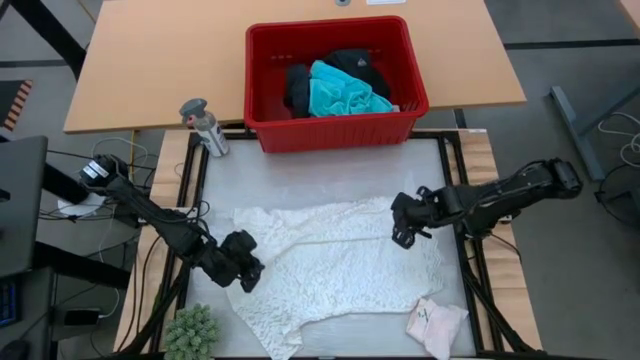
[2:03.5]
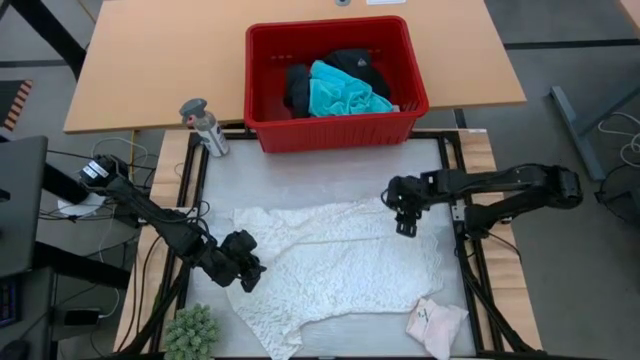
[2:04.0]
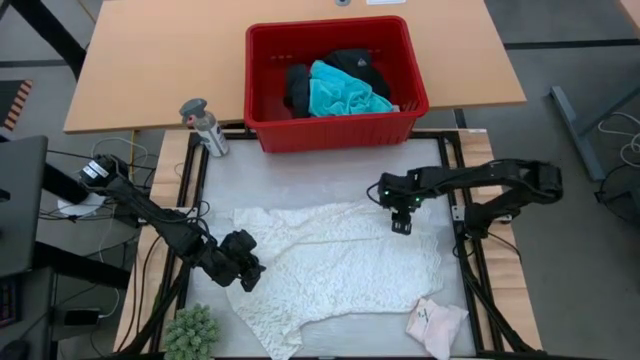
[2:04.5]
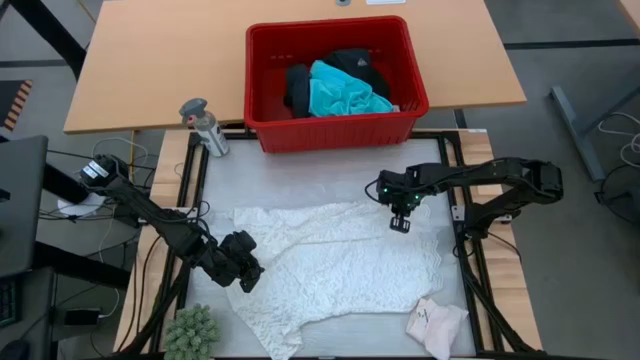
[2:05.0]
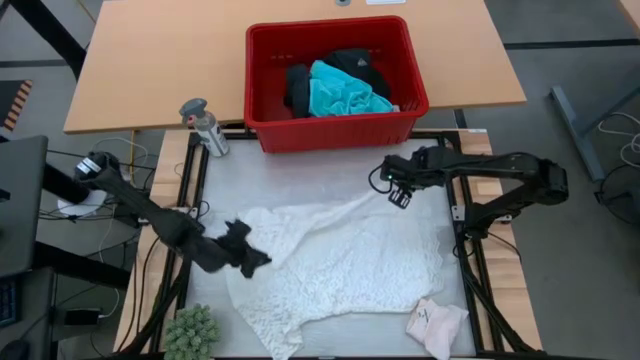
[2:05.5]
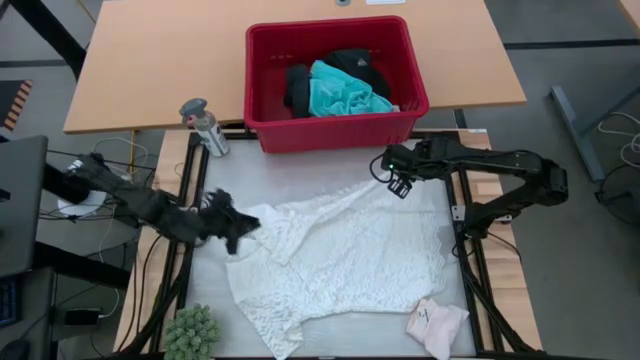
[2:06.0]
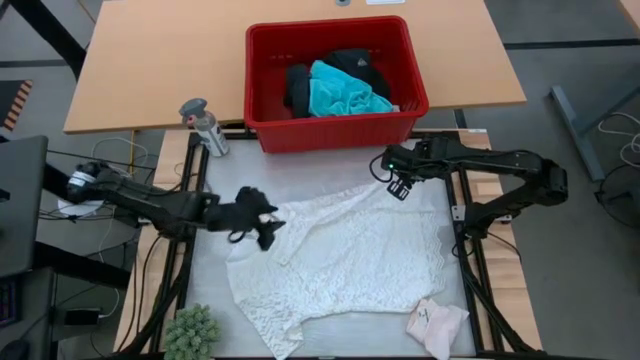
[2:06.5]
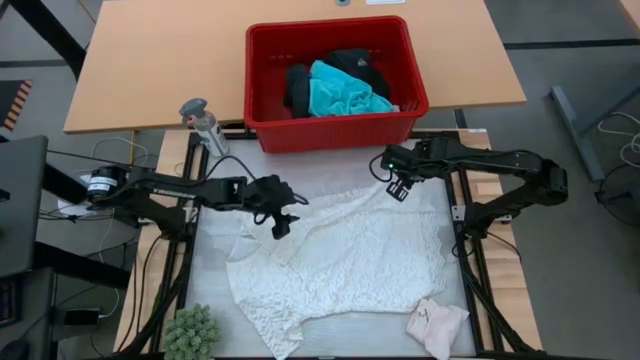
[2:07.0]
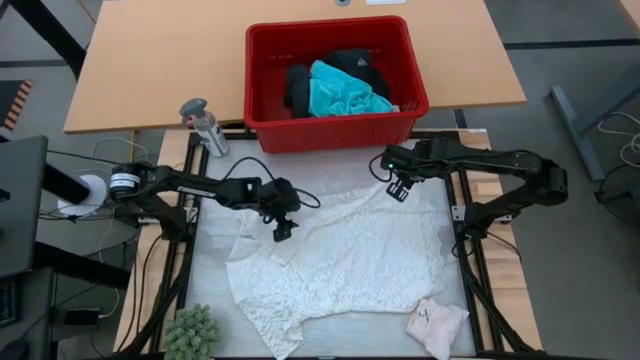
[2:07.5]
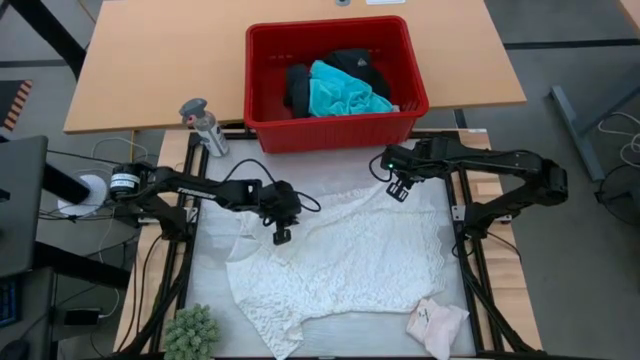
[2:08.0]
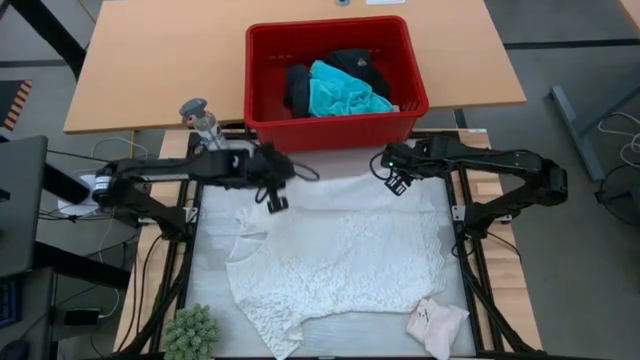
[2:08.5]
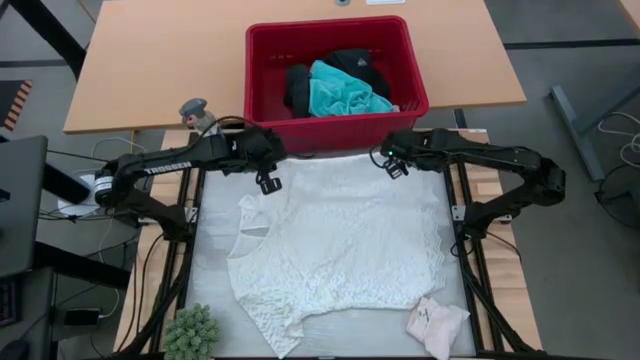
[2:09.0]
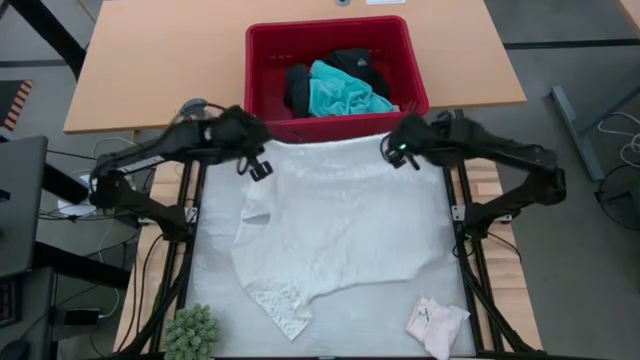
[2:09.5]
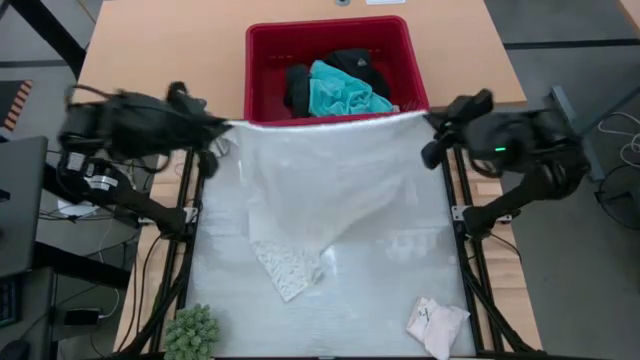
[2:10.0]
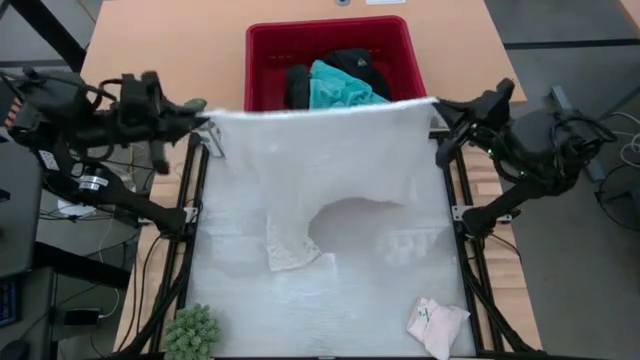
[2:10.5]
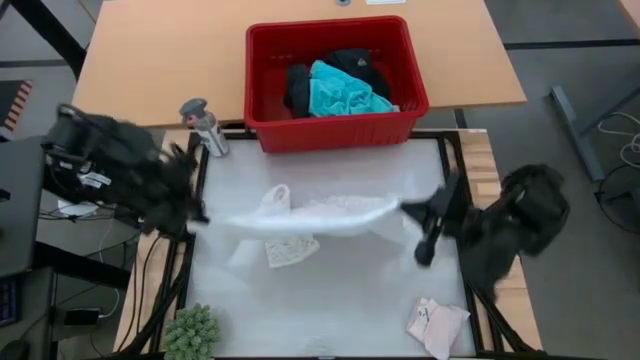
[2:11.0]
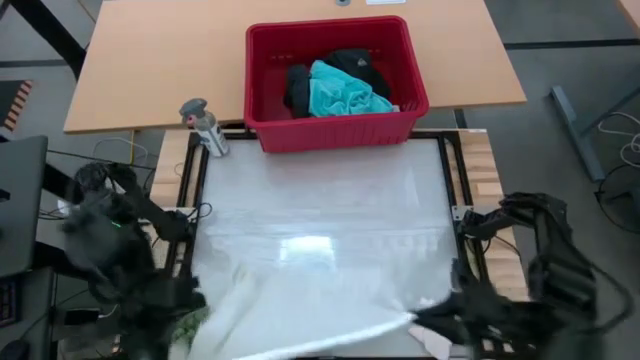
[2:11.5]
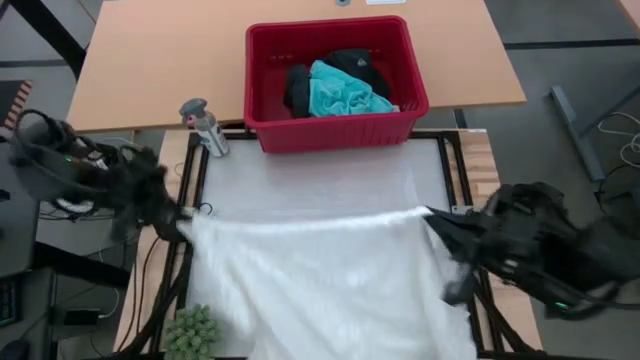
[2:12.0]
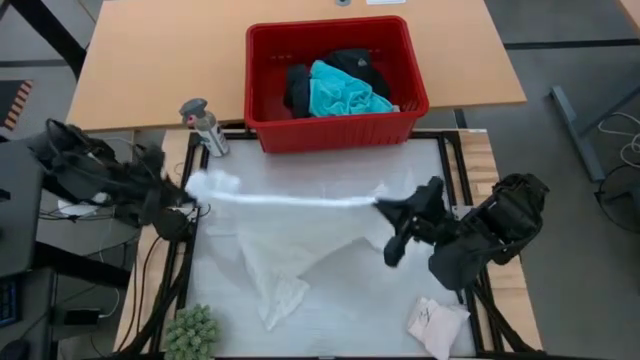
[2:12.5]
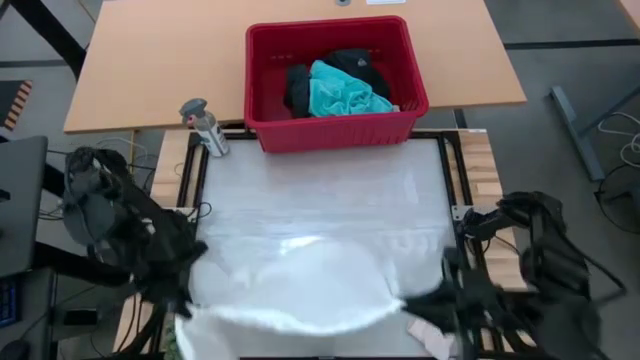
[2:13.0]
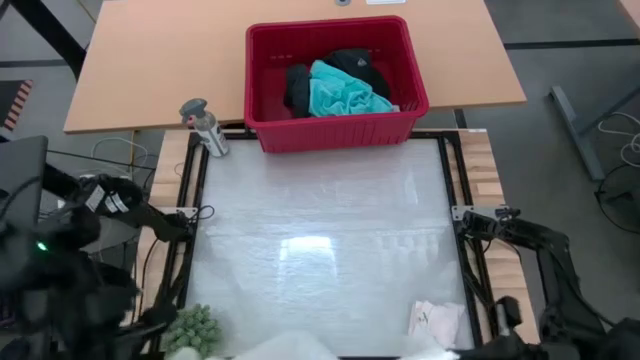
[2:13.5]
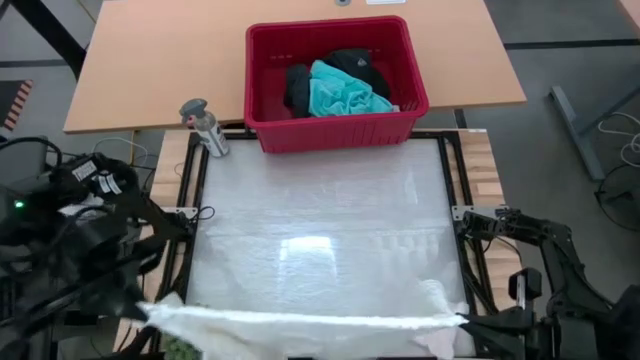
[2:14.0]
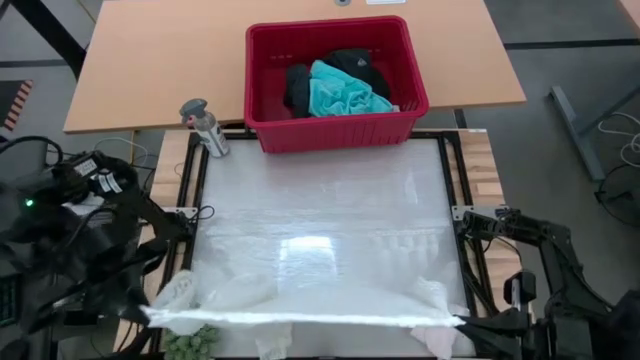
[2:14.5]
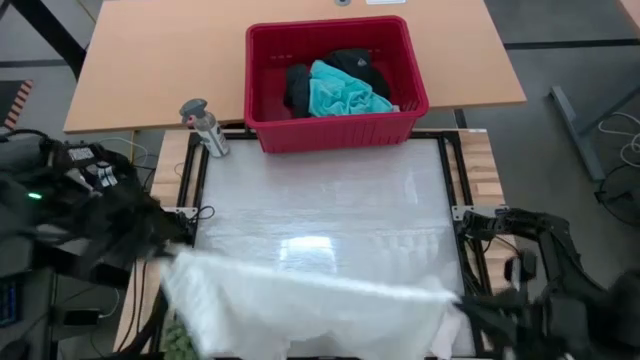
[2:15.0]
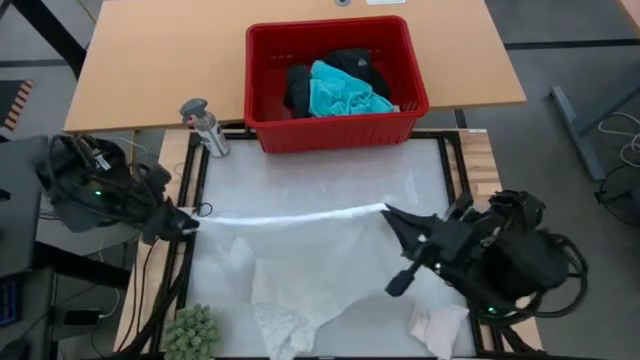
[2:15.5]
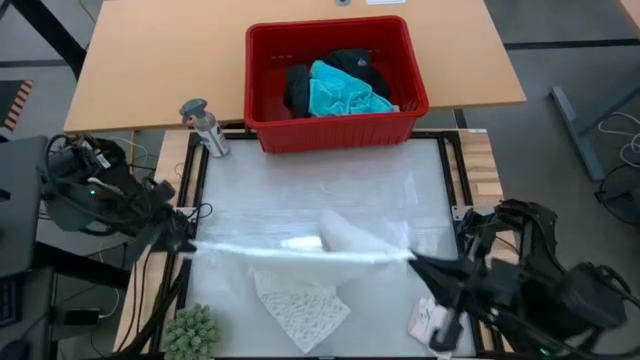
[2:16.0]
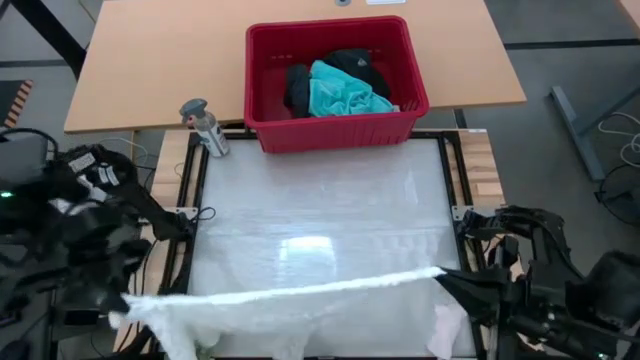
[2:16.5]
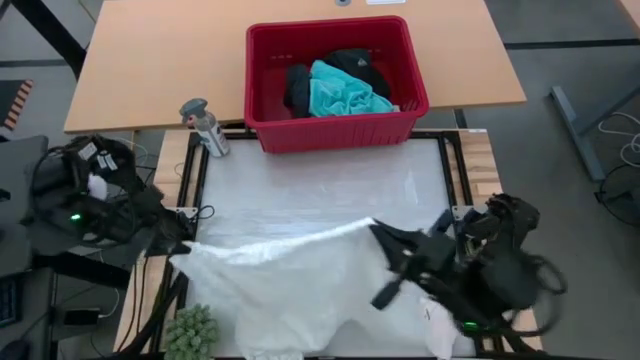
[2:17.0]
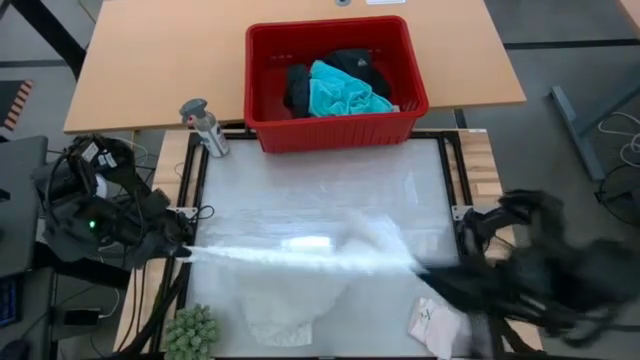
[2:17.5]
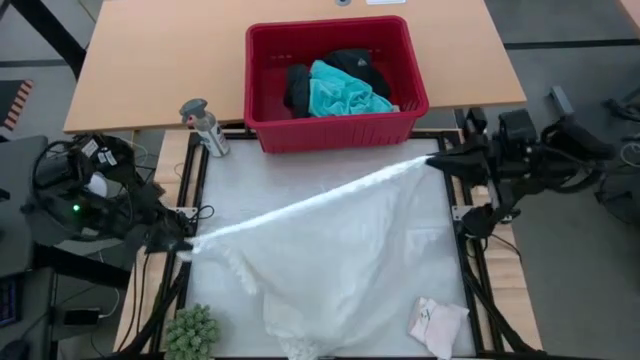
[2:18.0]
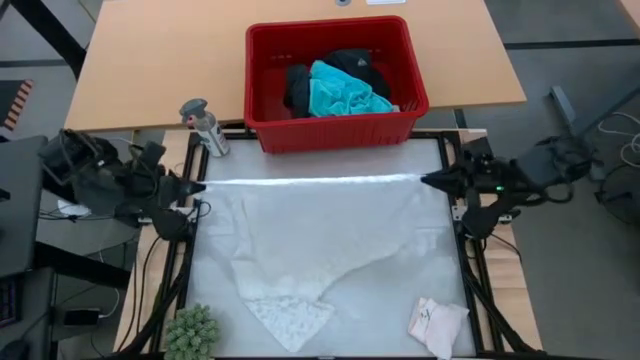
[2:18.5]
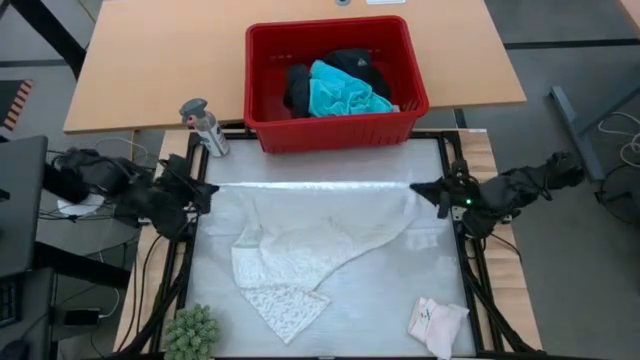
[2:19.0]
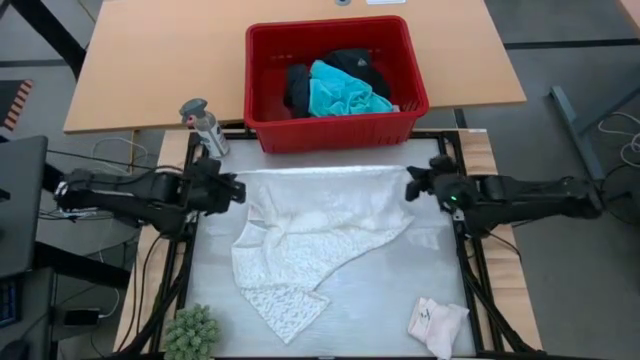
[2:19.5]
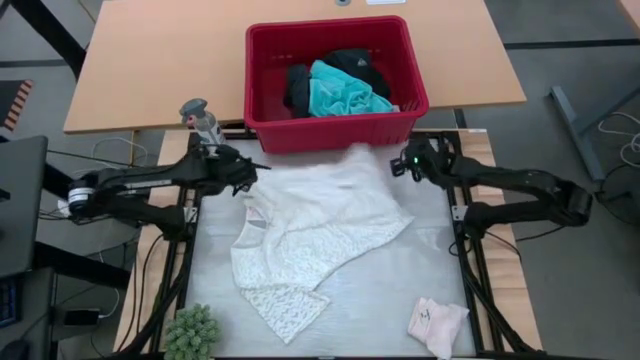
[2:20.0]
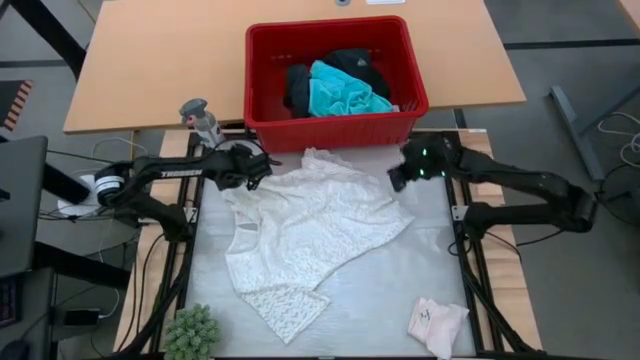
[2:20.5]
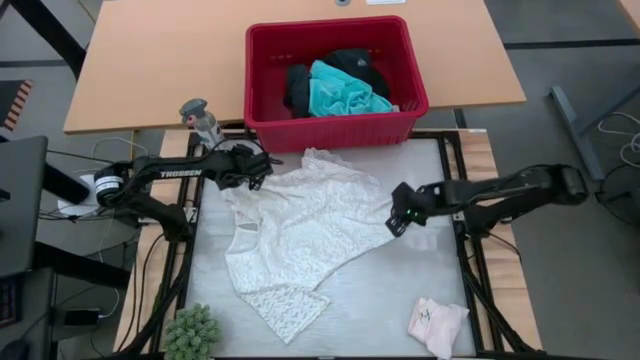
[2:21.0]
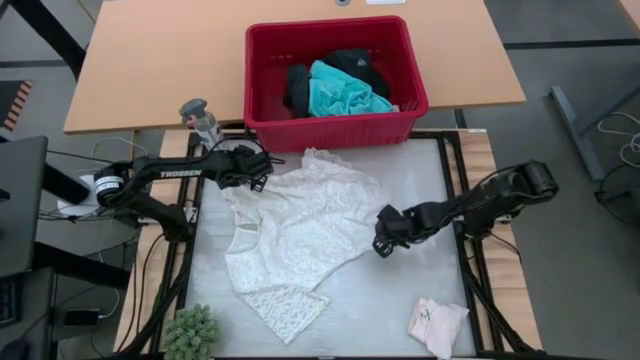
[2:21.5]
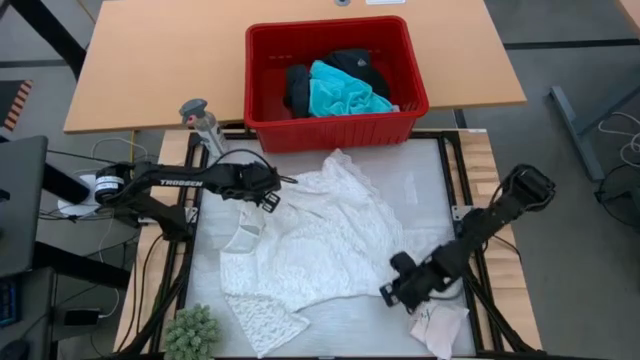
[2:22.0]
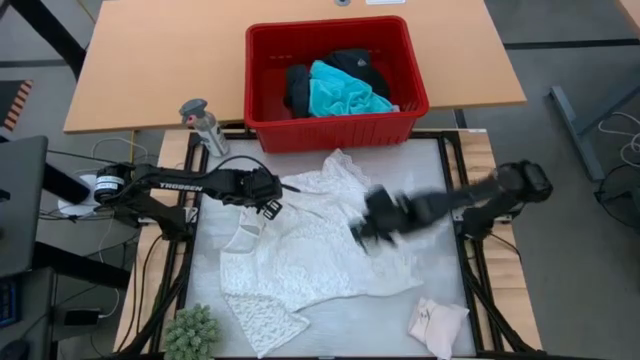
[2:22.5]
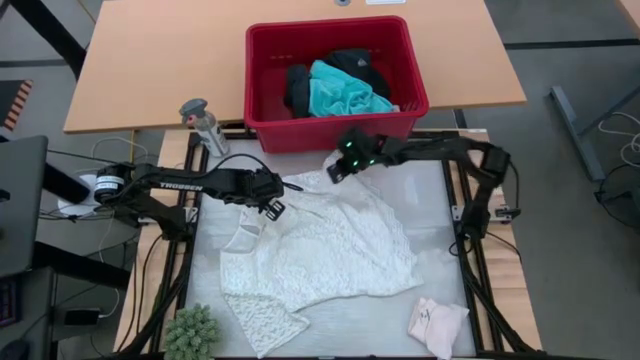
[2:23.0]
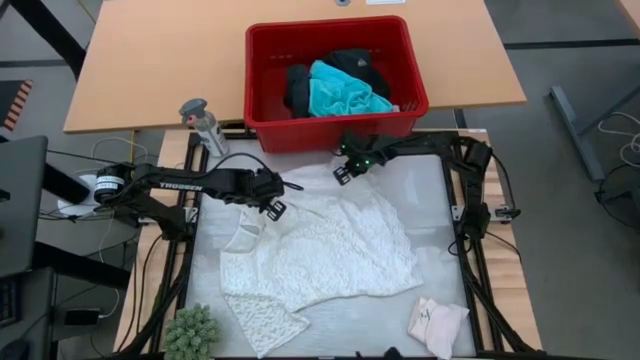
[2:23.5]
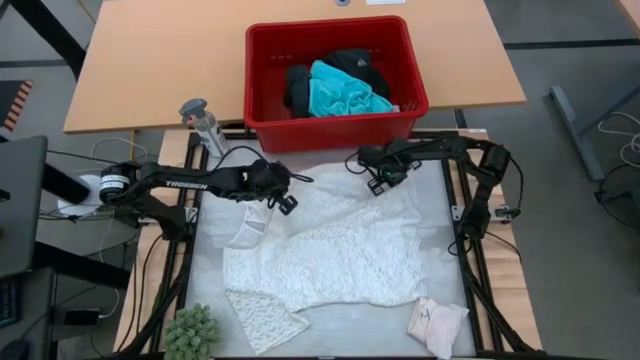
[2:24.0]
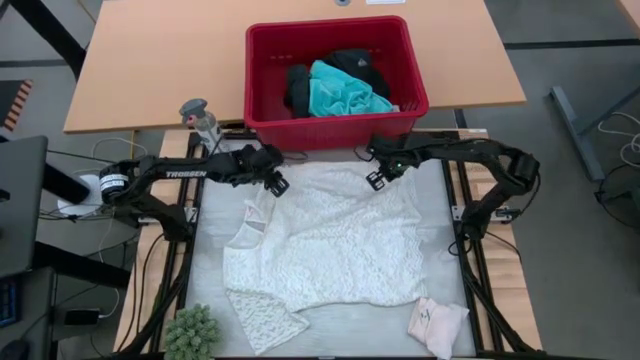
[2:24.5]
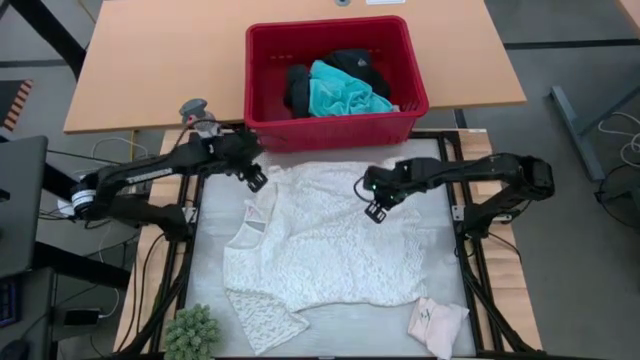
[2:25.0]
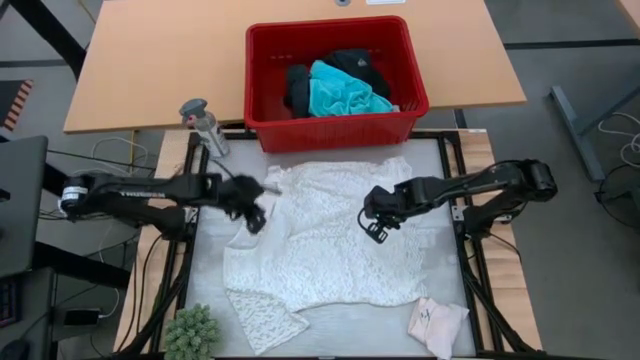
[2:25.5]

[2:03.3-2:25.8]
Task: Fold Laundry from Bin
Fold the white blouse
